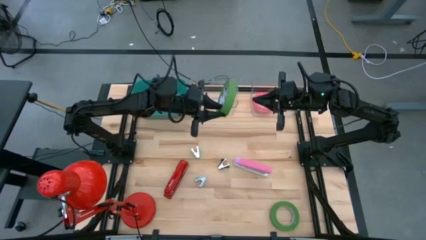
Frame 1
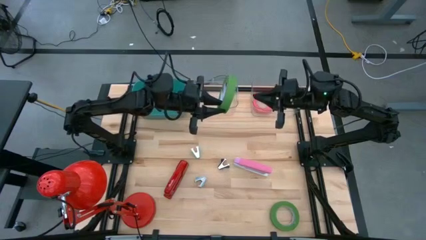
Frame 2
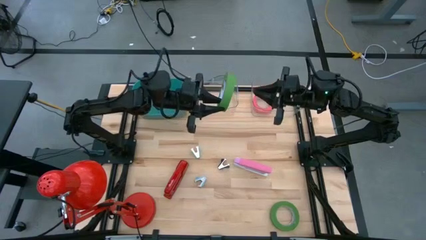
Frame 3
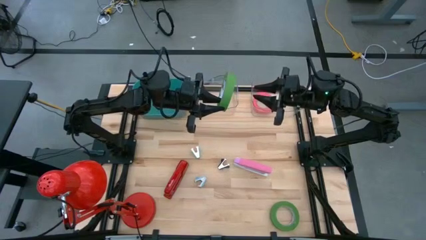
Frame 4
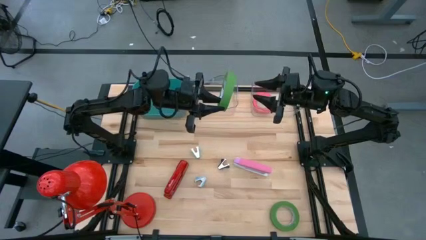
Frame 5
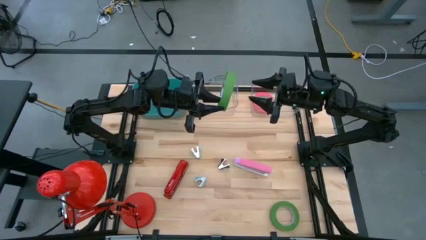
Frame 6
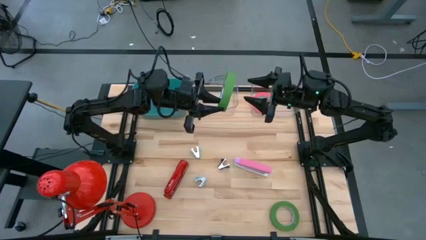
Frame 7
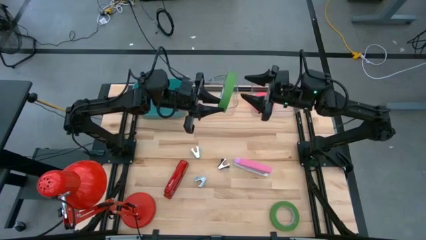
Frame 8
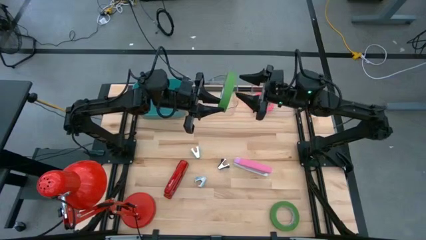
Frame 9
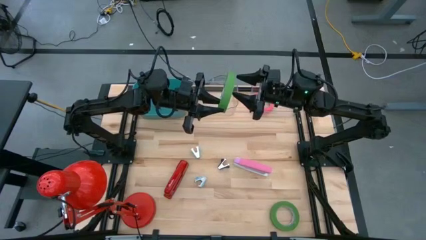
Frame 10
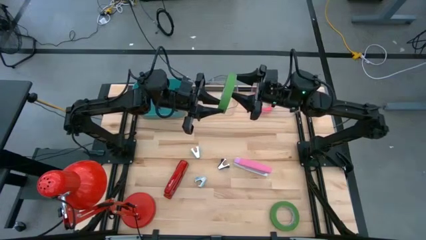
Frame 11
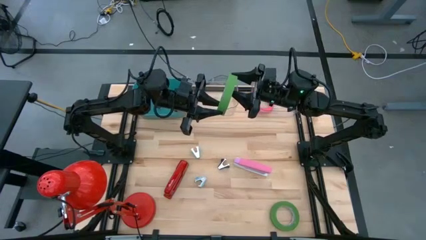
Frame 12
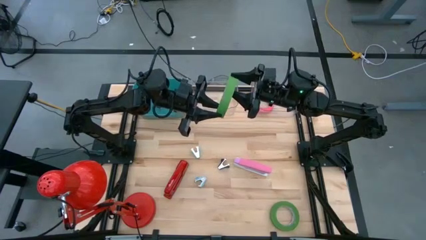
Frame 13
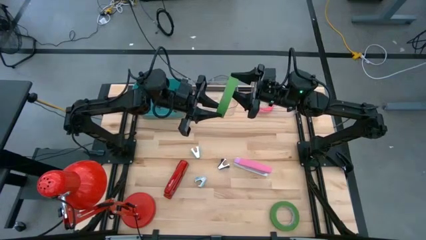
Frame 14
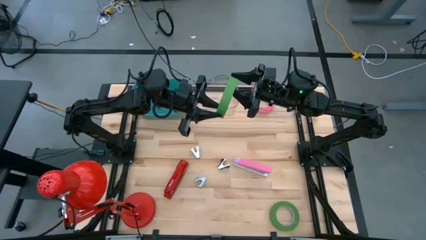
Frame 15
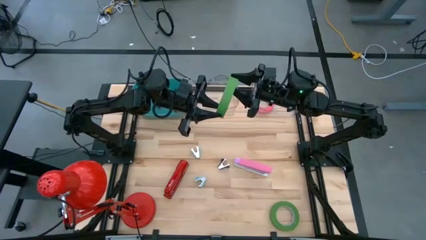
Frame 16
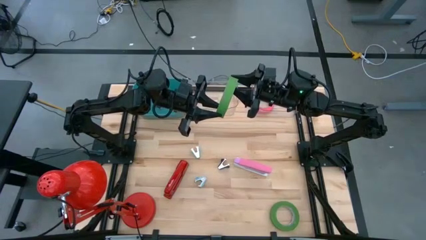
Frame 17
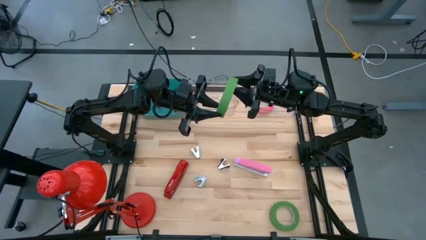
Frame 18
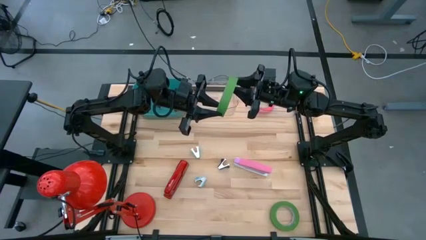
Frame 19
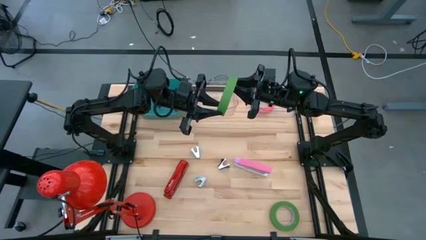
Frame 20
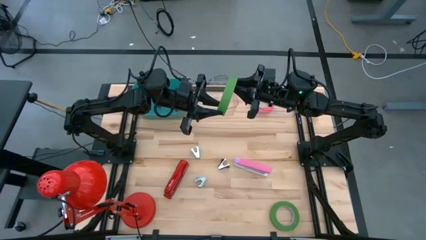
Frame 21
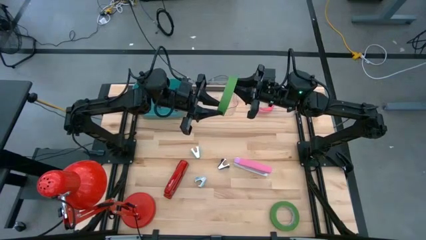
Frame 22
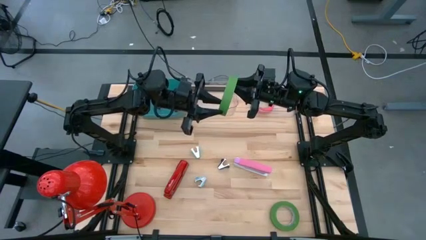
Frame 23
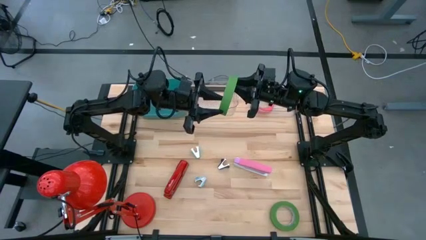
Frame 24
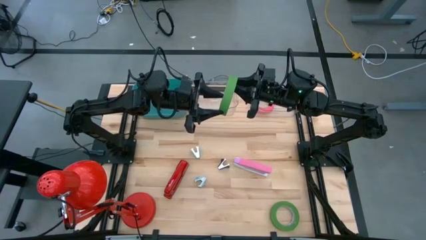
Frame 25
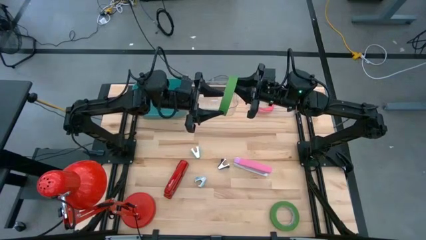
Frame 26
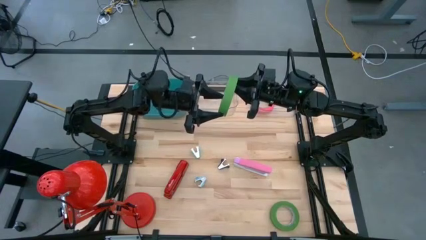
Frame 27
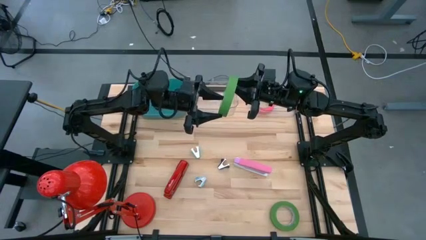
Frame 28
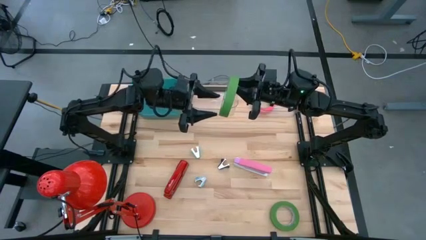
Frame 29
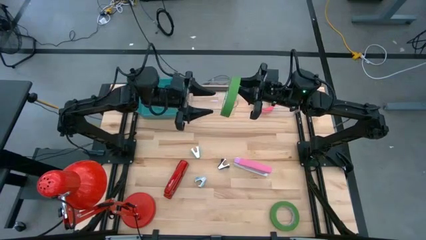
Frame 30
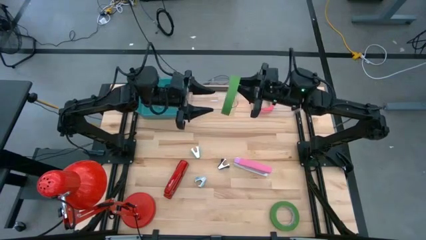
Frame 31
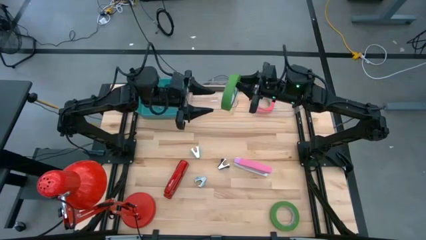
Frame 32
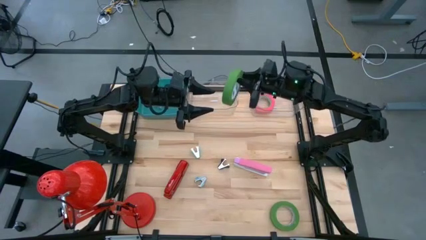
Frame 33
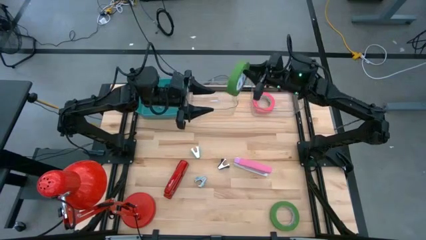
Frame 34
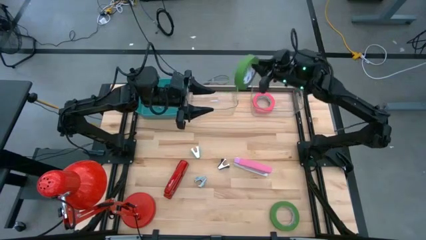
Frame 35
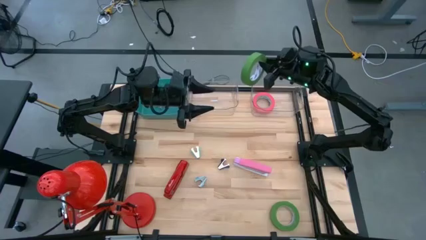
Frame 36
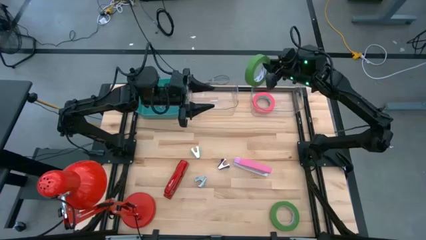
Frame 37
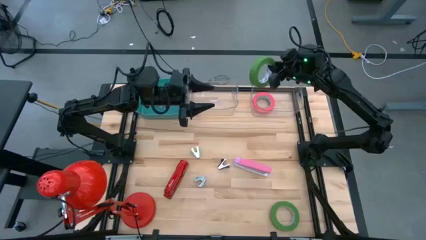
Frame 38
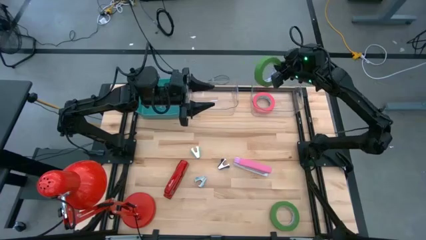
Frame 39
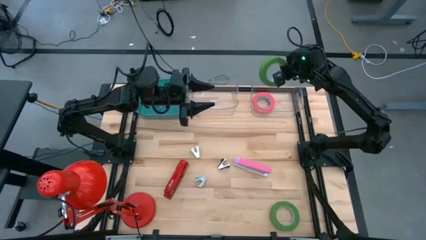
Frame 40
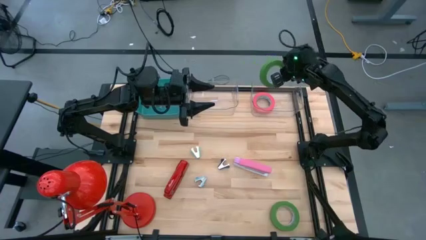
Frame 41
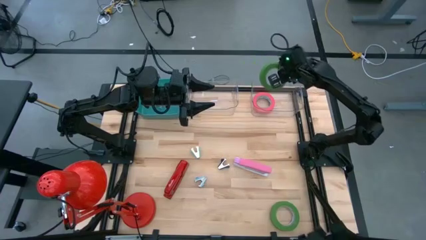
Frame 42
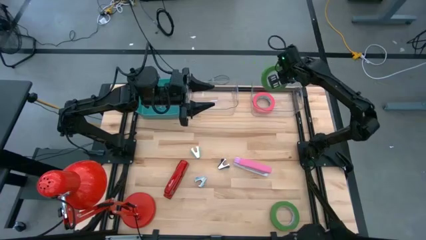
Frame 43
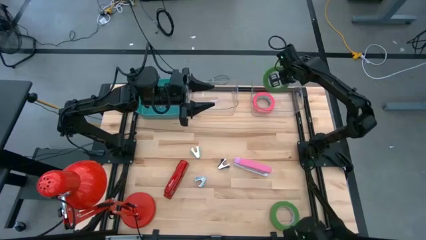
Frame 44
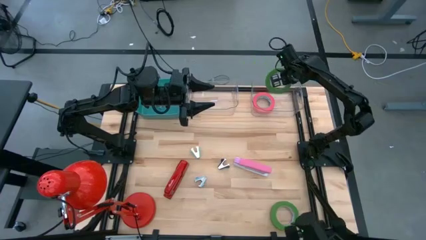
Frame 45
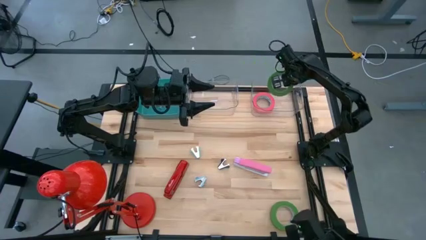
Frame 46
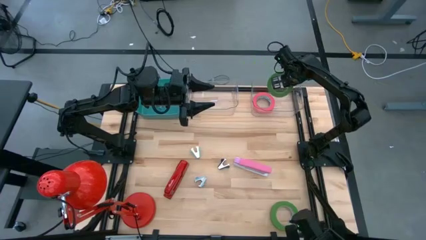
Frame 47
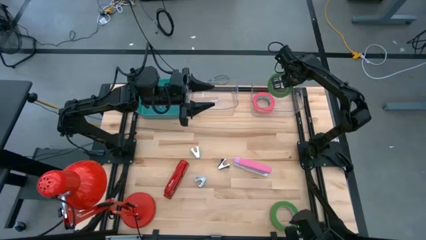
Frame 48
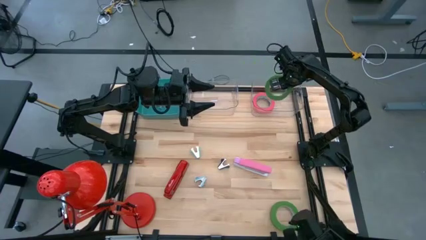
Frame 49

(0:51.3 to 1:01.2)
Task: Pick and place Stapler, Stapler remover, tape
Put the top green tape into the right transparent bin

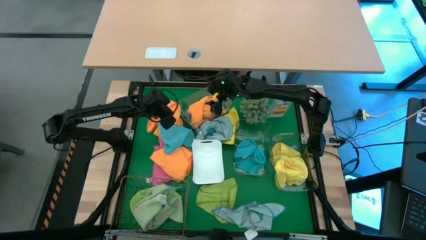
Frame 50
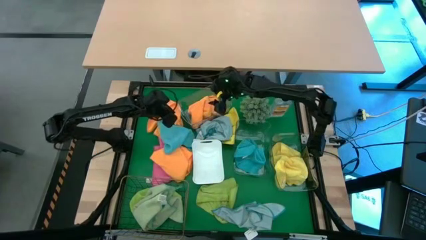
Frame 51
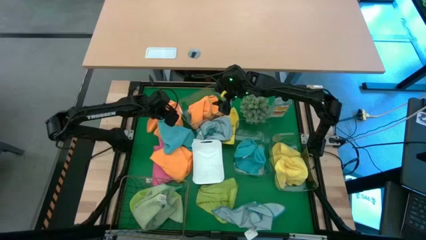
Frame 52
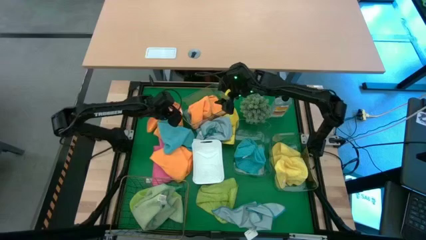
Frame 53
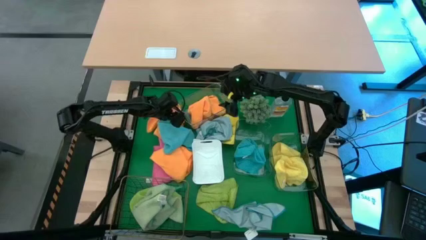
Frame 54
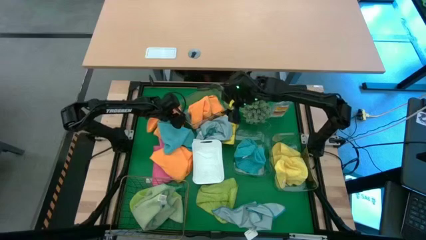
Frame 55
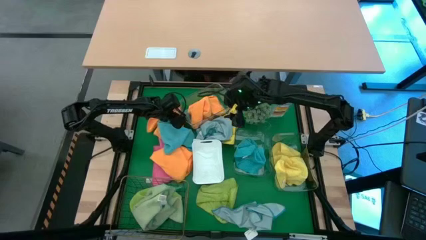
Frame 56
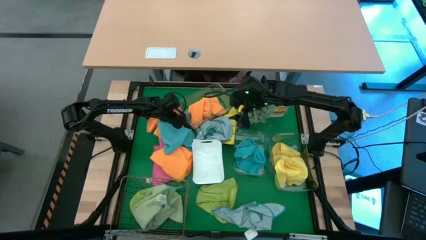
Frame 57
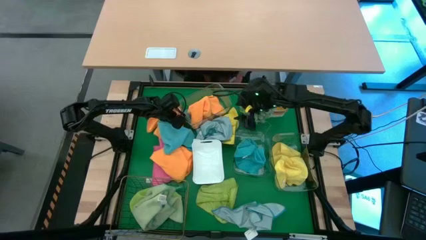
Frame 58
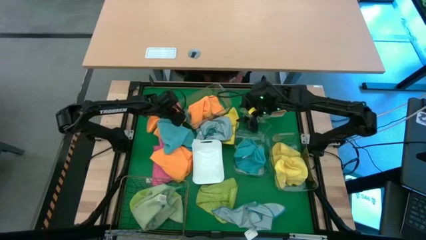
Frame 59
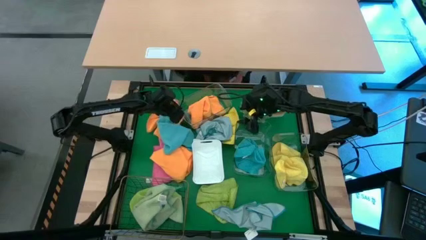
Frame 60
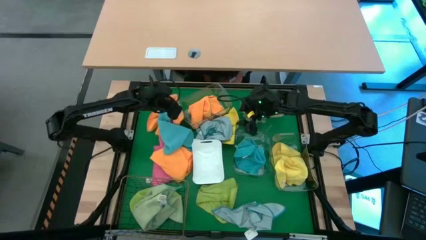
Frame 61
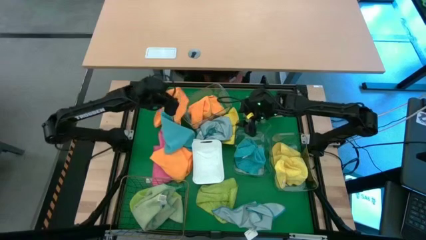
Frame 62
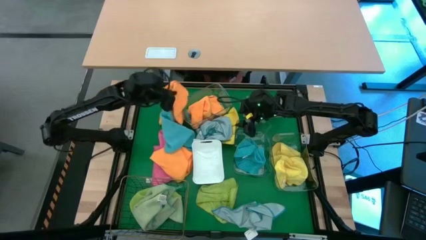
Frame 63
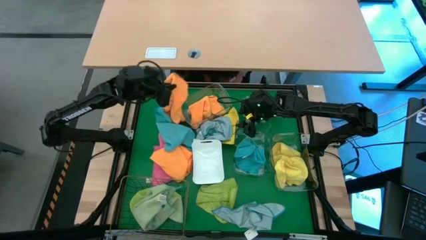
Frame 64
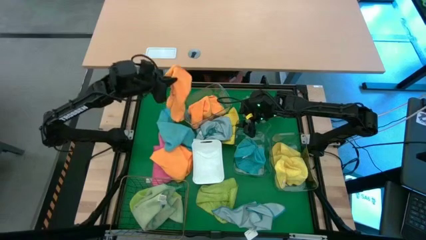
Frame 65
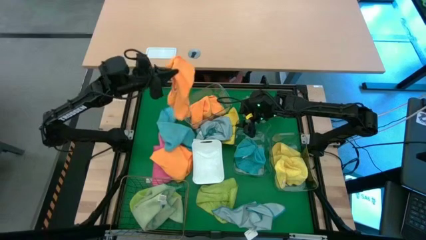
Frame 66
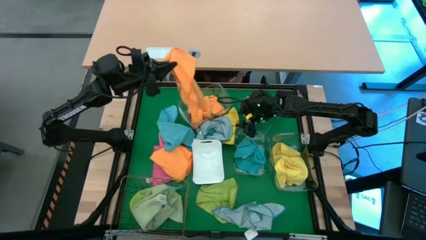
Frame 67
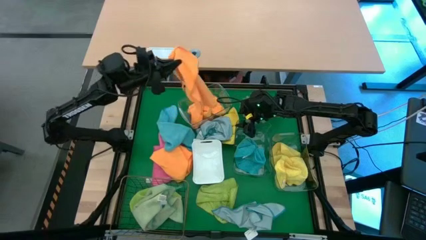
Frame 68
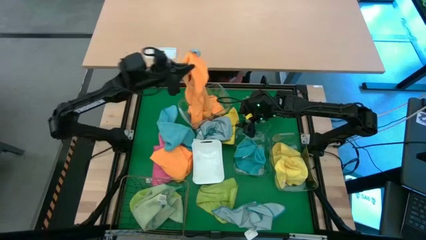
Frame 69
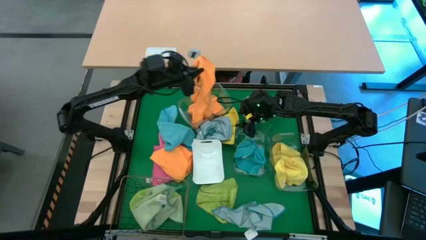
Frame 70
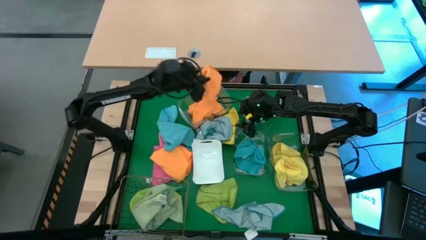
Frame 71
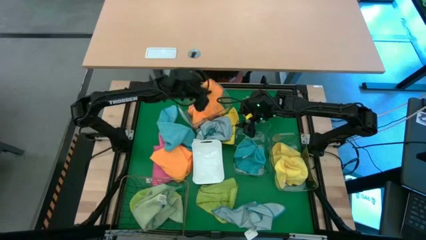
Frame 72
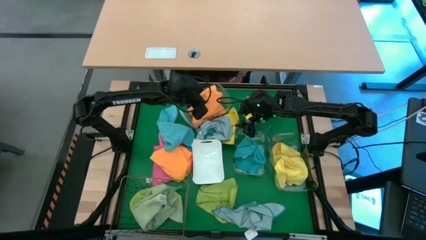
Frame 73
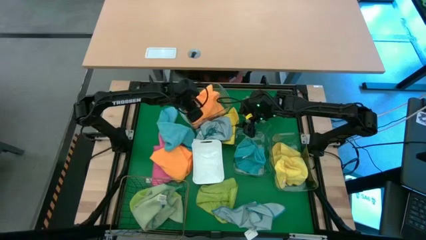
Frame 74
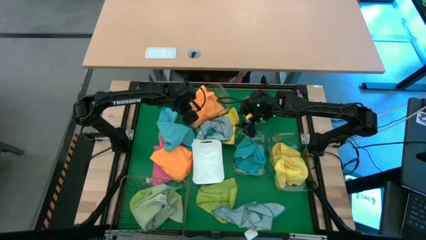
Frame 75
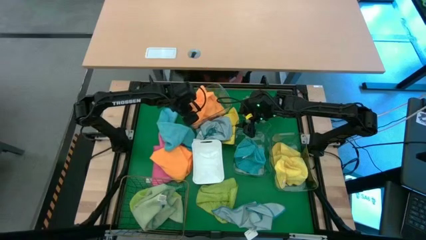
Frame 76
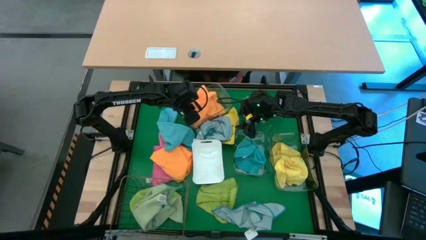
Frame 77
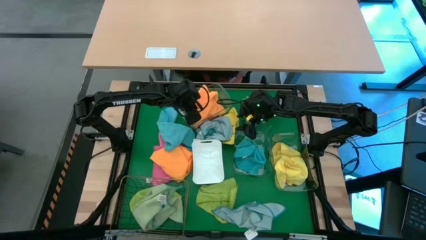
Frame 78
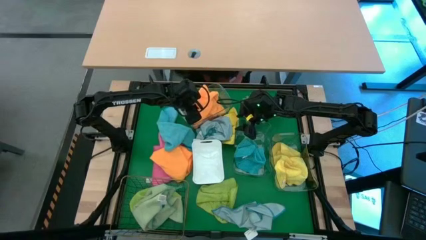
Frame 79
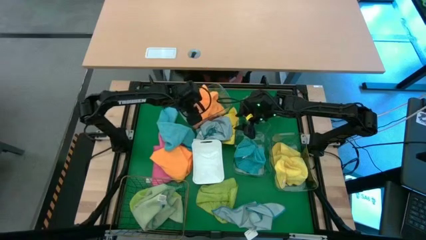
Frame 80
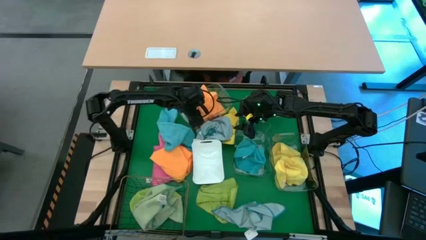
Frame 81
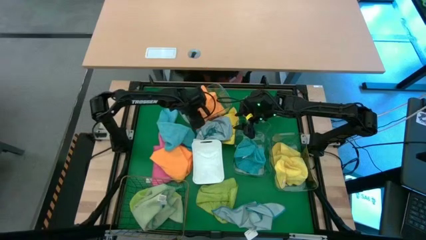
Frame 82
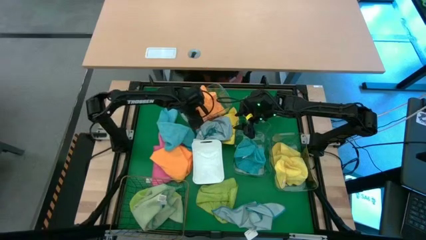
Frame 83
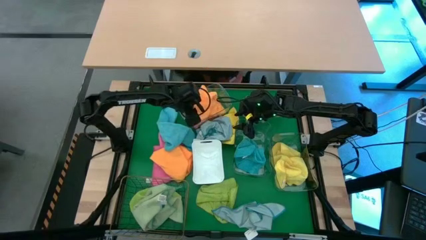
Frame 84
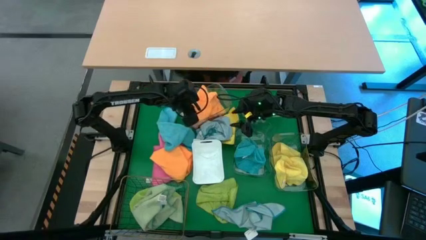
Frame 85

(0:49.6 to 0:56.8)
Task: Sort microfiber towel by color & place in baskets
Put the orange microfiber towel into the top transparent bin
